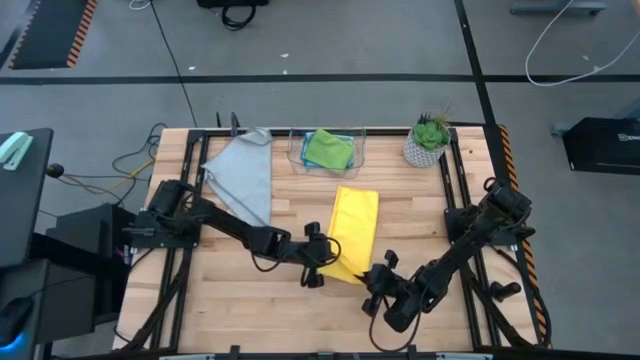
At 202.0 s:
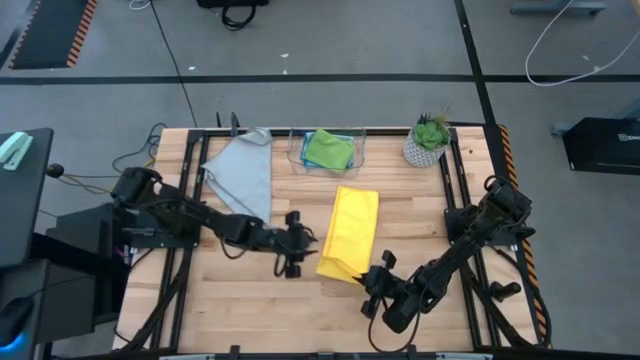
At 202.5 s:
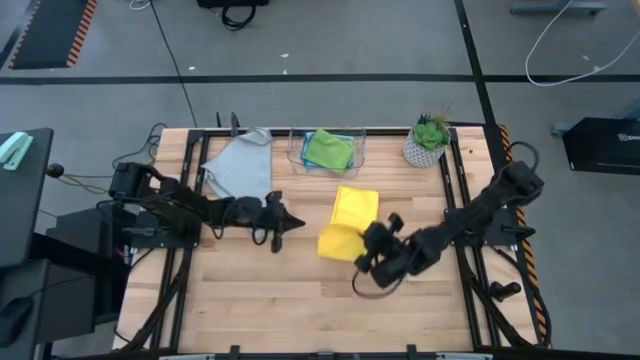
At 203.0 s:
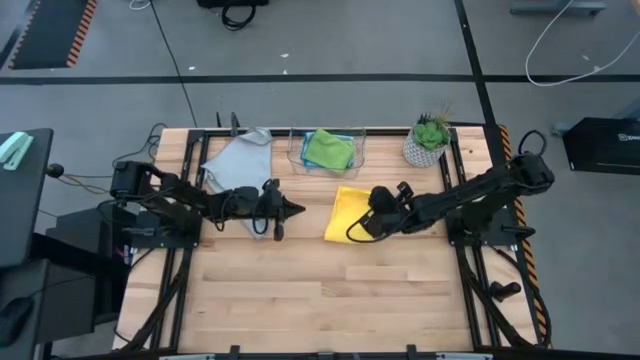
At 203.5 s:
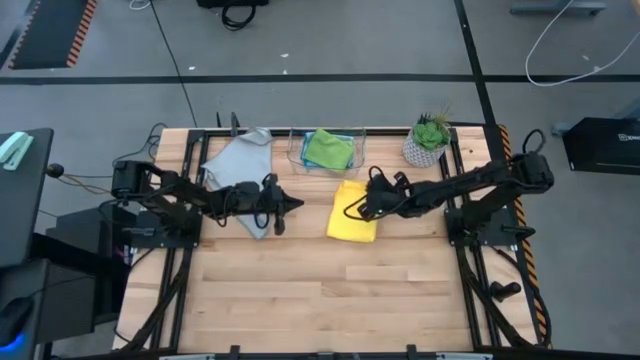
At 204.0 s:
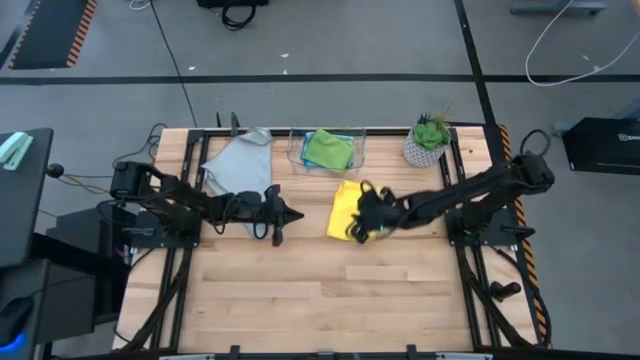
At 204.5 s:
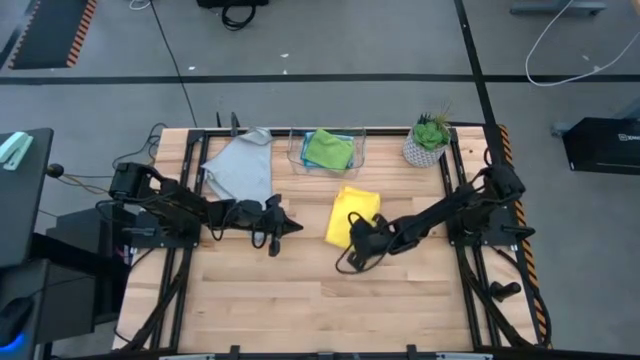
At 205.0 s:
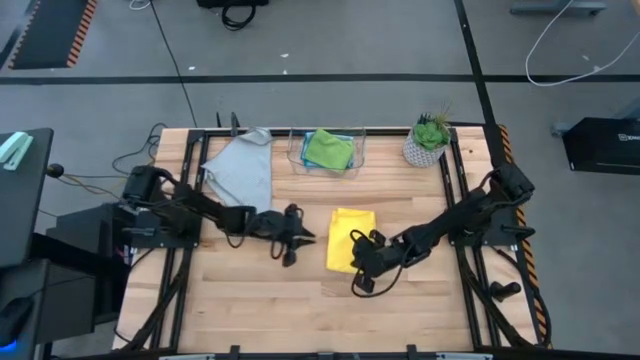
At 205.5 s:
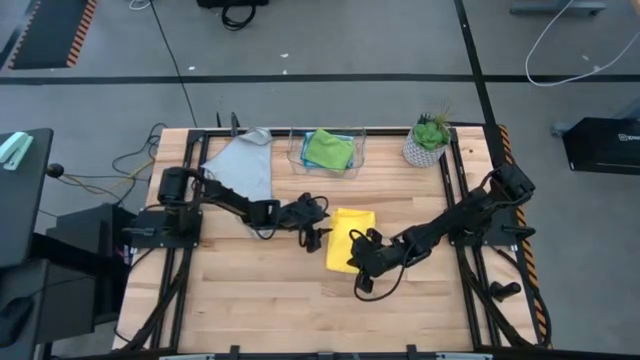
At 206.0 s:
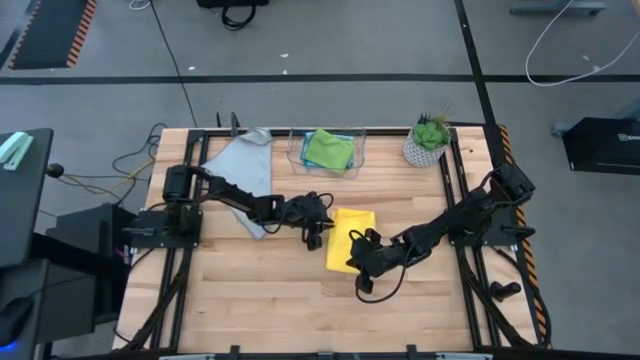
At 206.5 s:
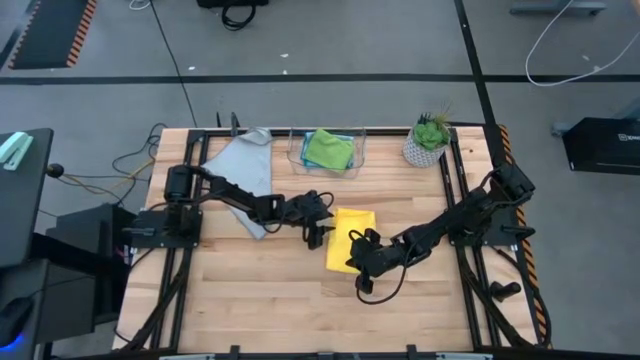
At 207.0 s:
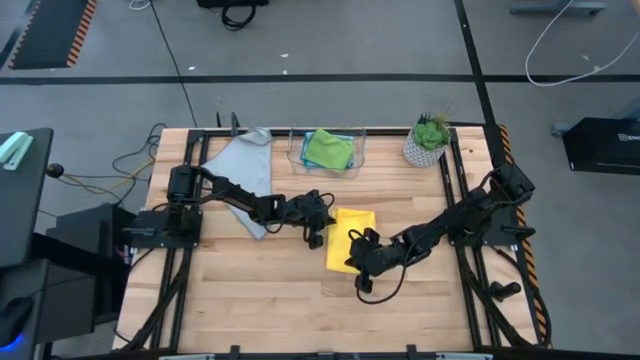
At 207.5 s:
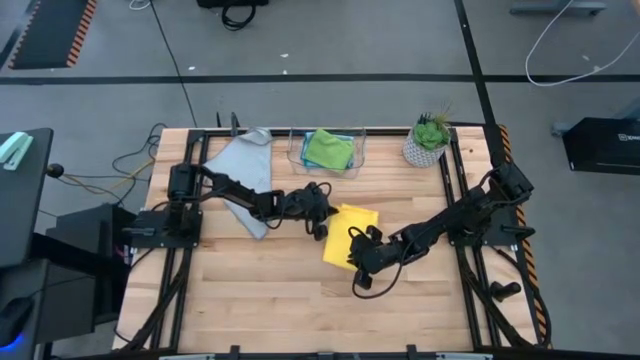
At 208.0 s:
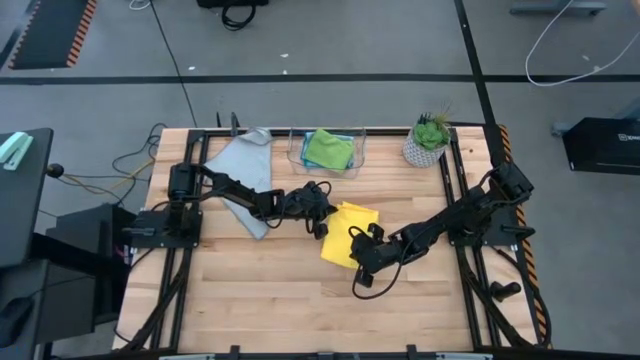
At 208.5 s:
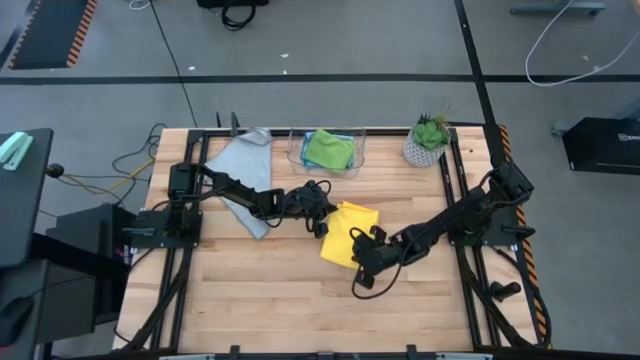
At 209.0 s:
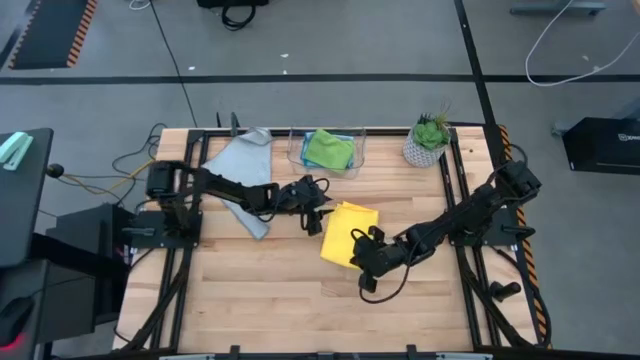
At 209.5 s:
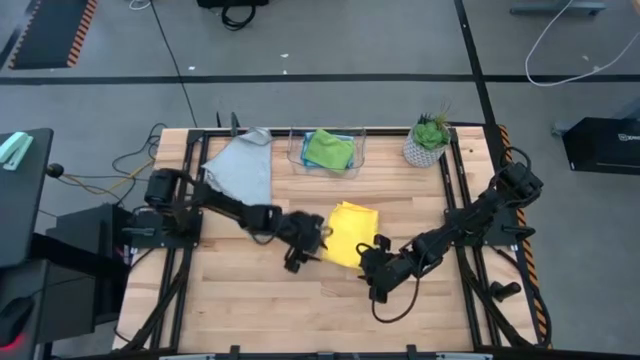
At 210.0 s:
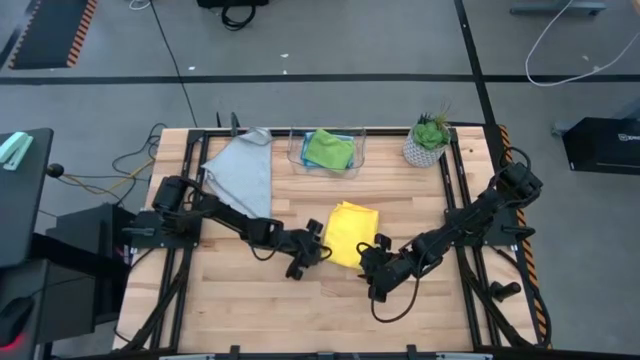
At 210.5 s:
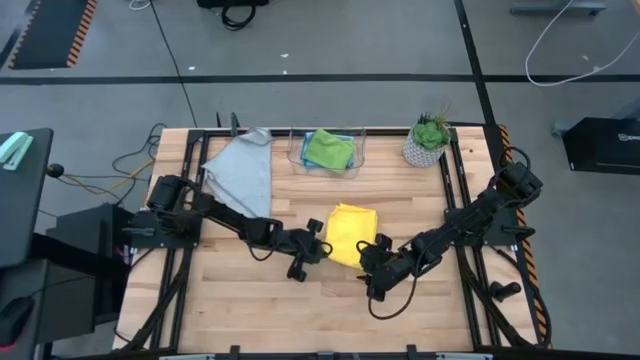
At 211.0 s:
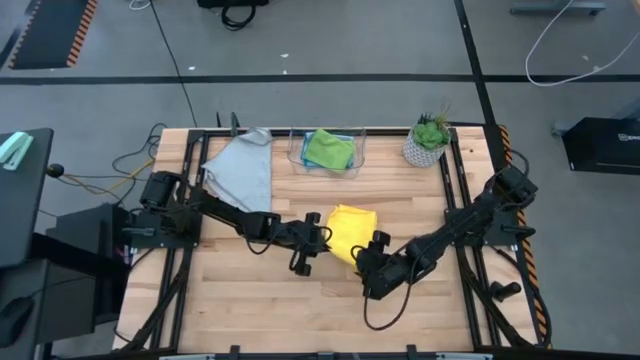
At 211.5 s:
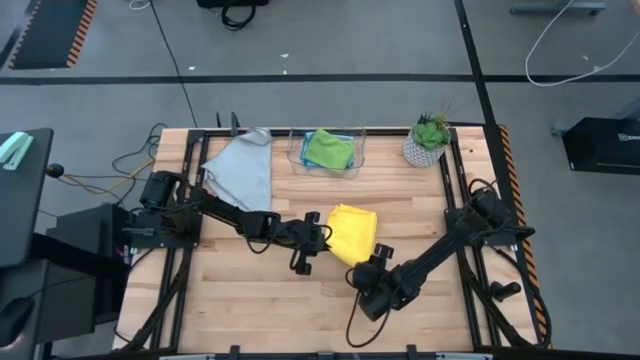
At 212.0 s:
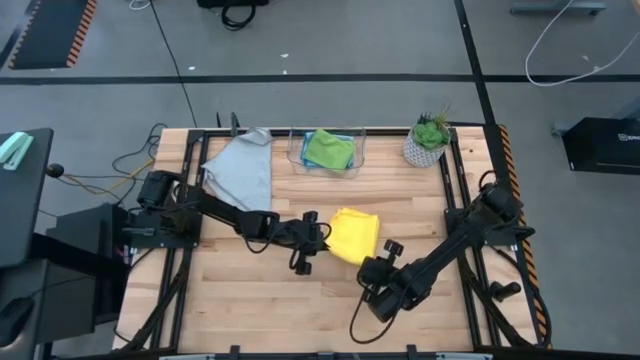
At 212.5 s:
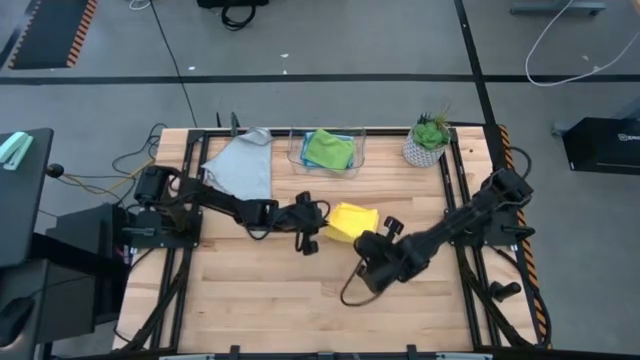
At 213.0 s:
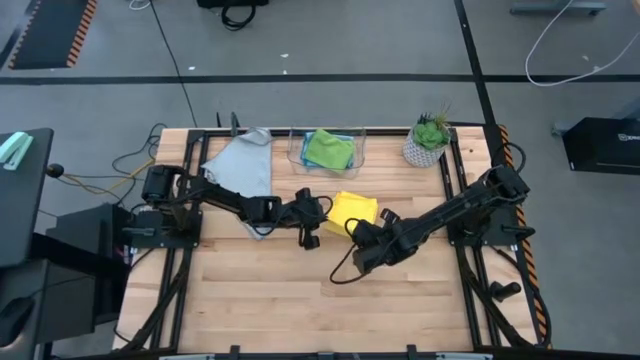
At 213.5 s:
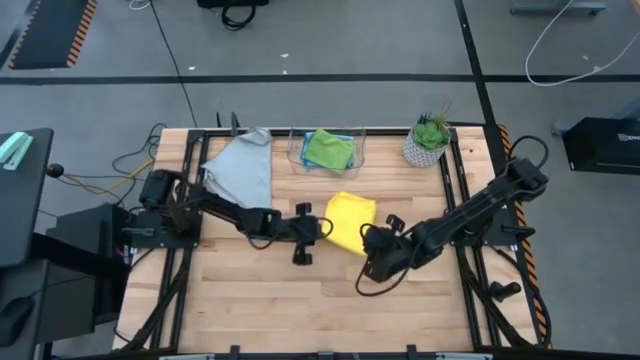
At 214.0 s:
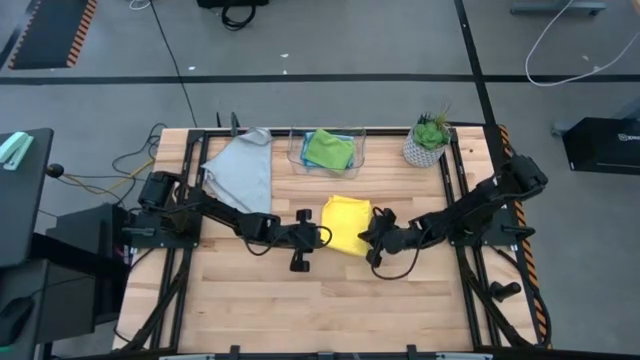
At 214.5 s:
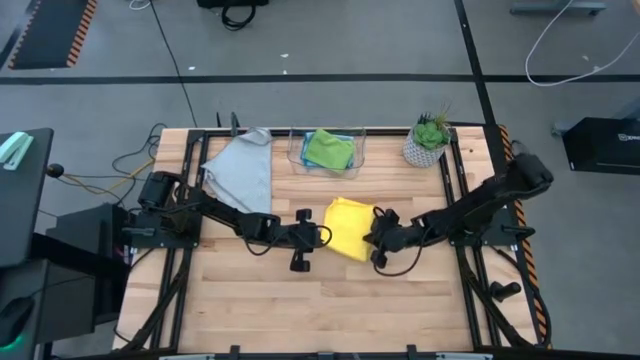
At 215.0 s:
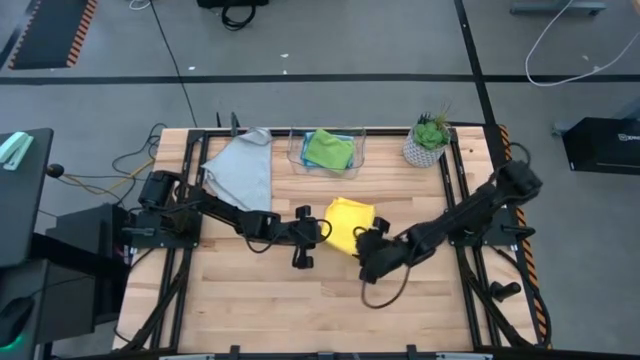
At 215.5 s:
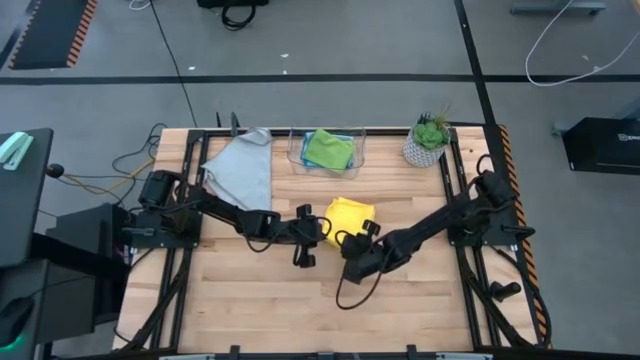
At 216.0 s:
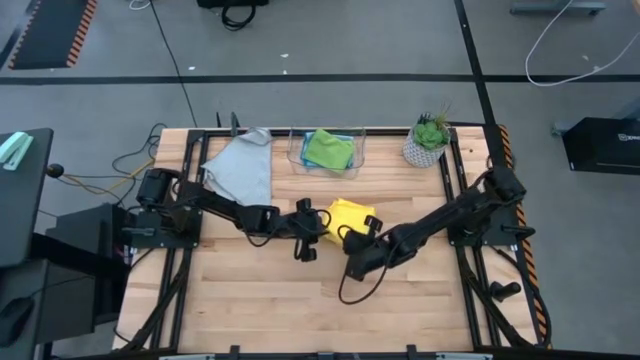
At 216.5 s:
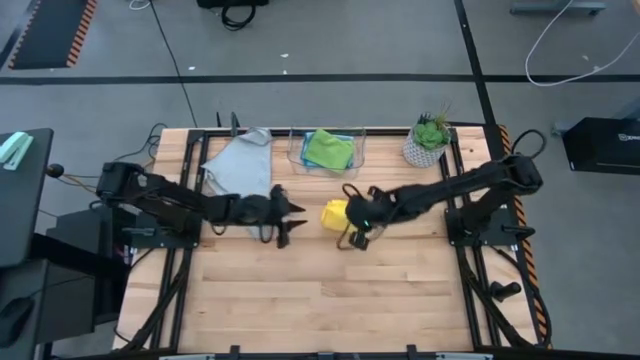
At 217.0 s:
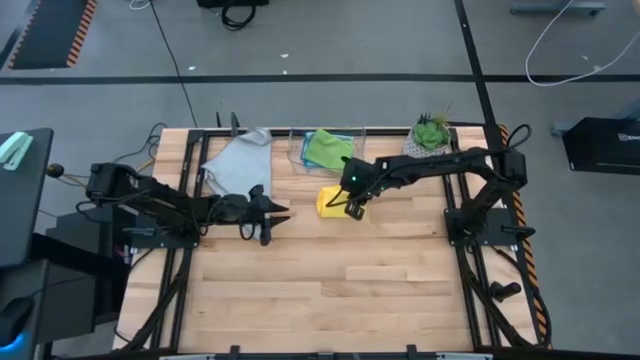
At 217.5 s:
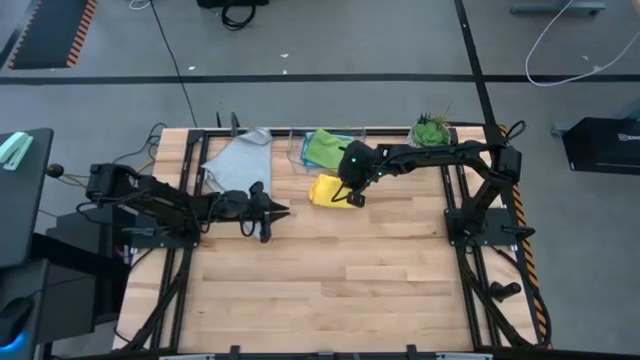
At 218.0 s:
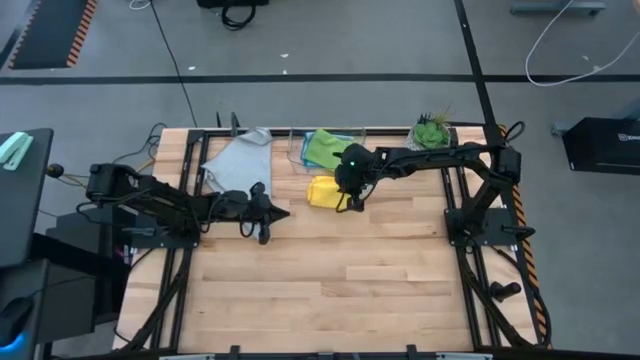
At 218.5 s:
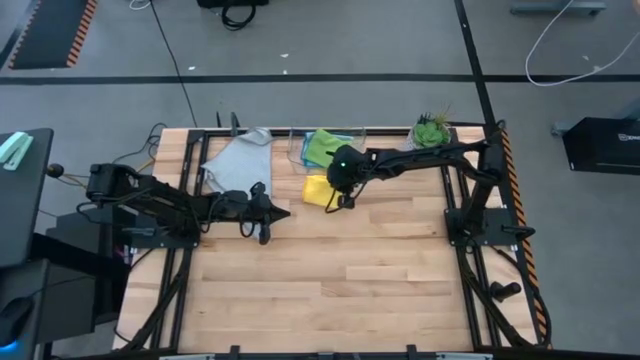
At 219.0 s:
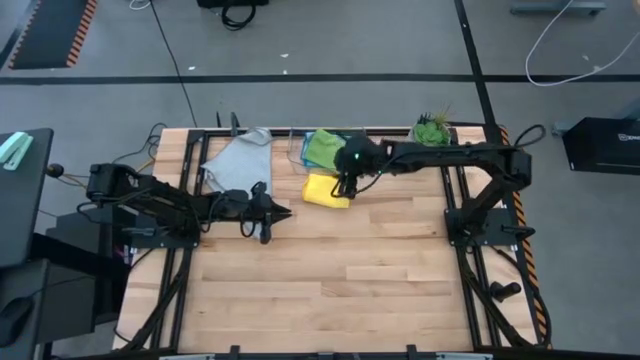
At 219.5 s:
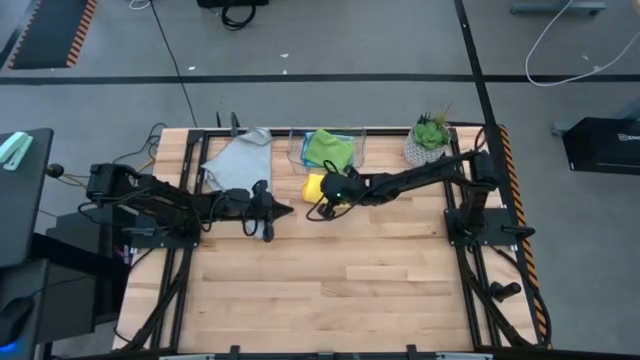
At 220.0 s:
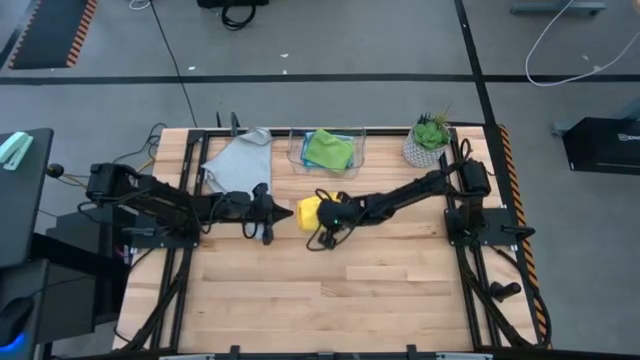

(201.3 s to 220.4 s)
Task: Fold microfiber towels
Fold the yellow microfiber towel

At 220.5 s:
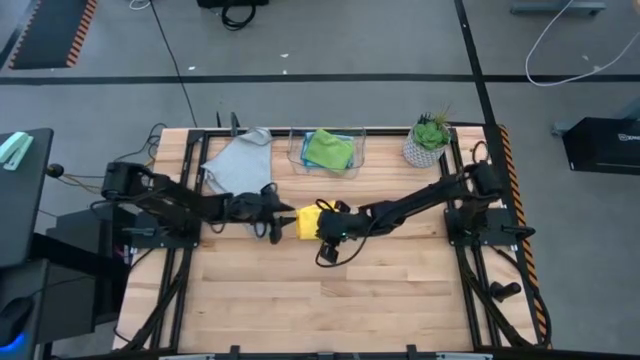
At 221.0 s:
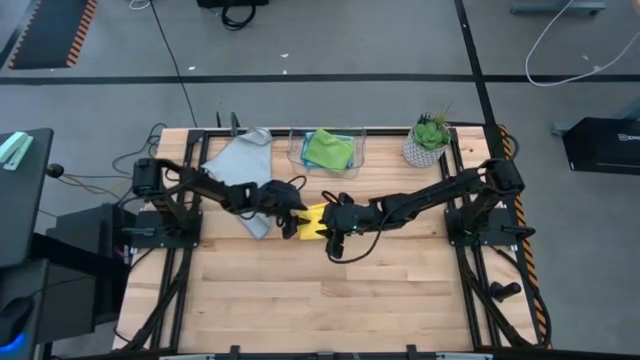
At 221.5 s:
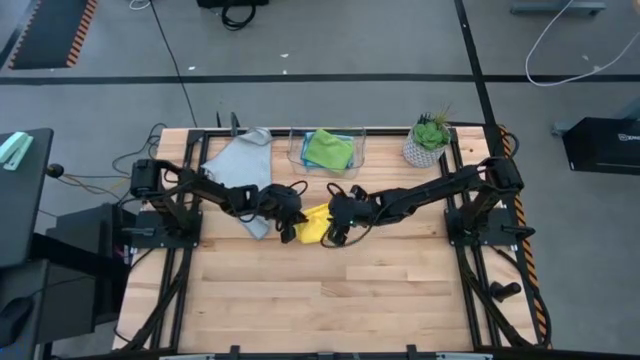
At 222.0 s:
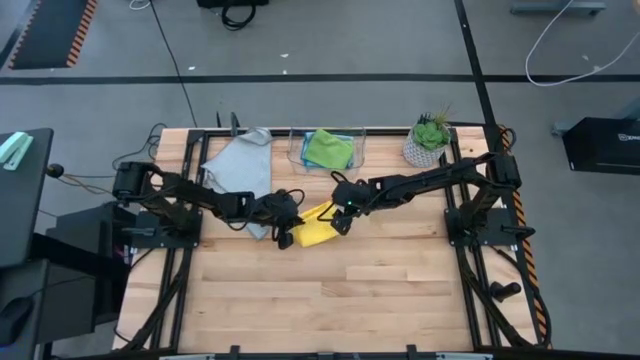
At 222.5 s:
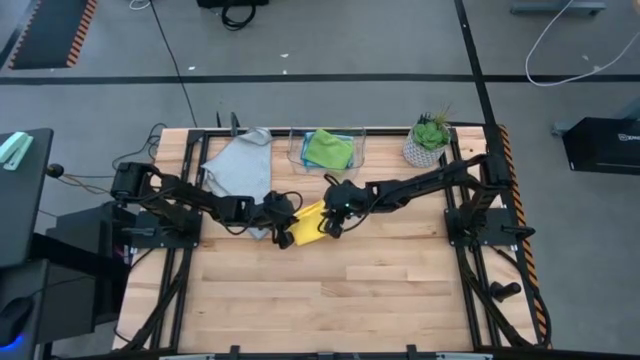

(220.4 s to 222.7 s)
Fold the yellow microfiber towel
